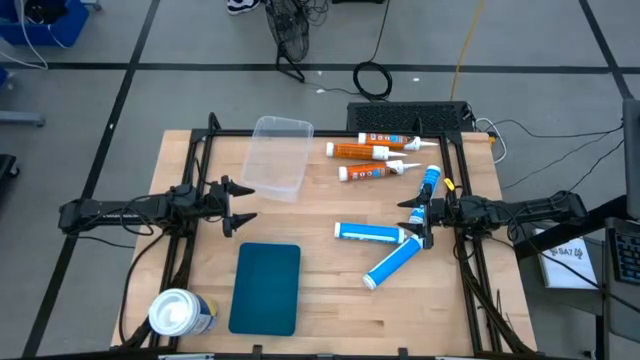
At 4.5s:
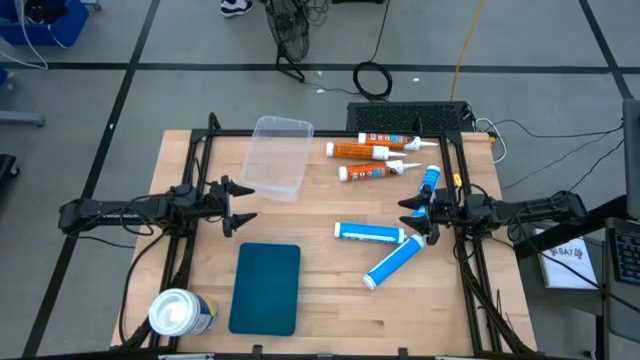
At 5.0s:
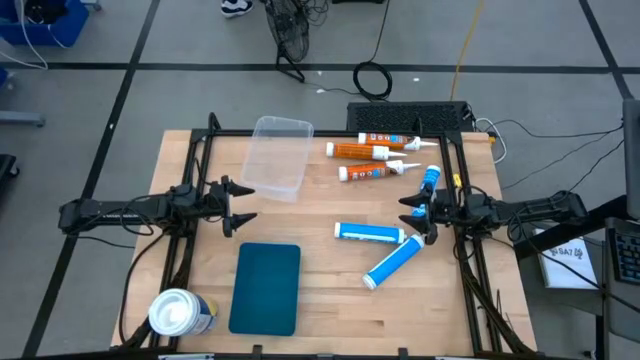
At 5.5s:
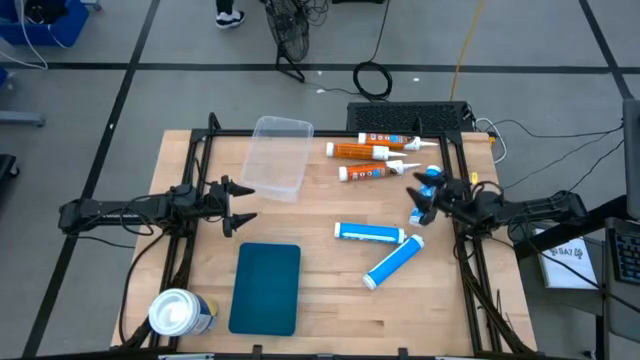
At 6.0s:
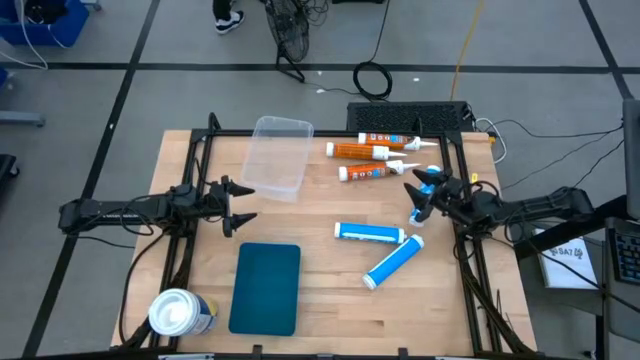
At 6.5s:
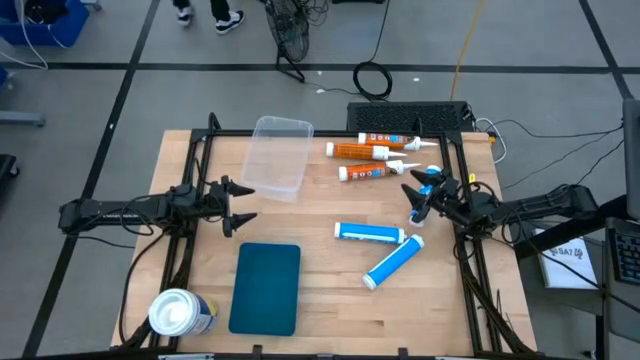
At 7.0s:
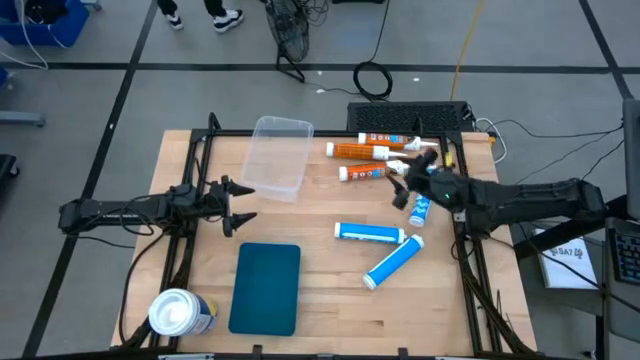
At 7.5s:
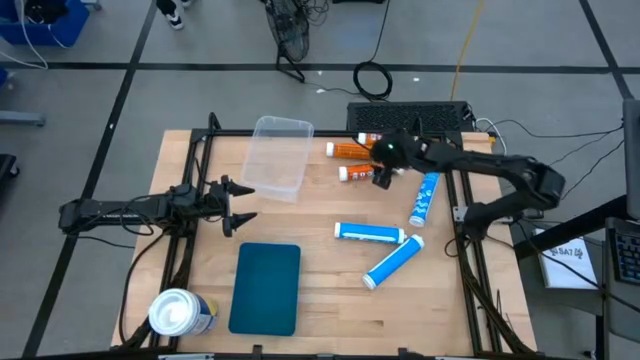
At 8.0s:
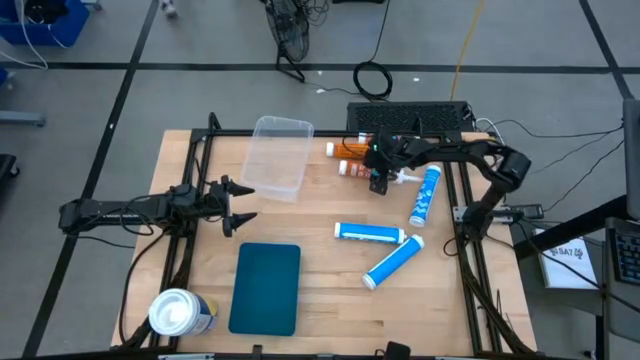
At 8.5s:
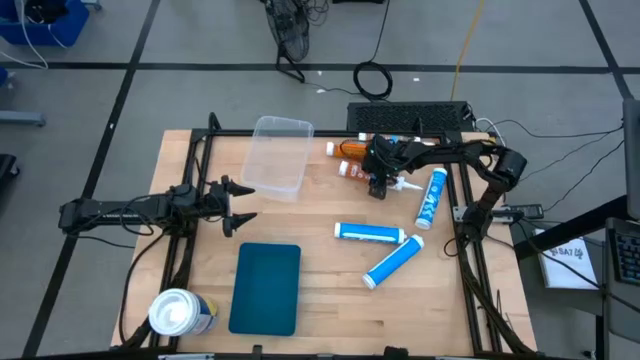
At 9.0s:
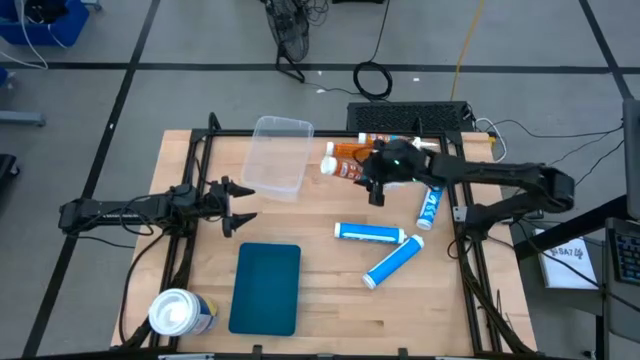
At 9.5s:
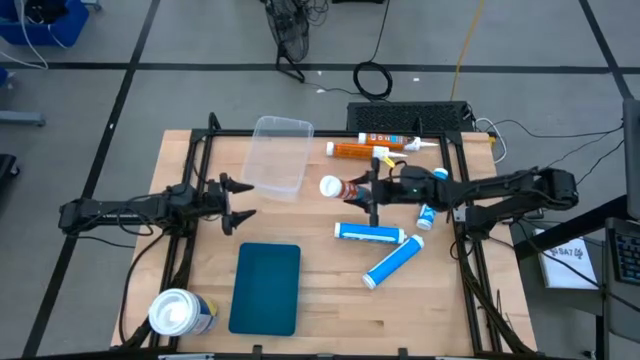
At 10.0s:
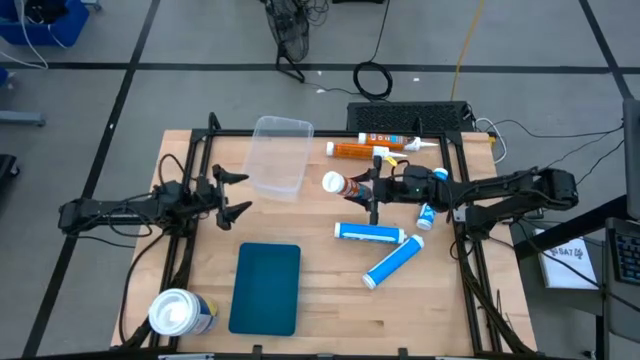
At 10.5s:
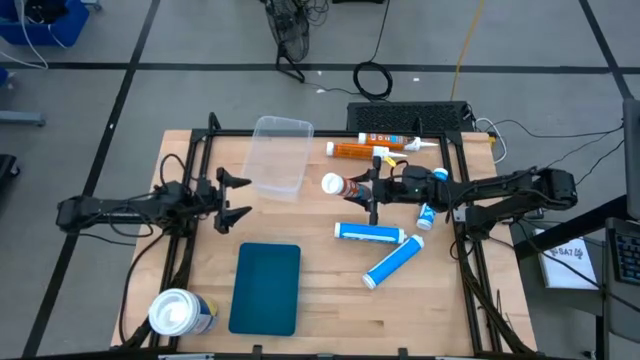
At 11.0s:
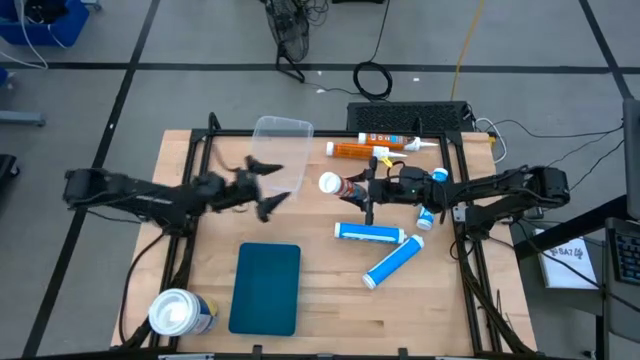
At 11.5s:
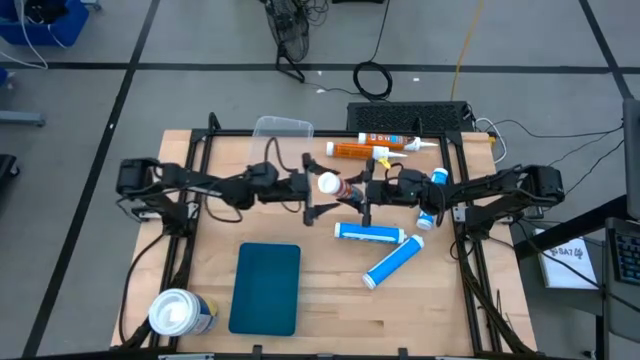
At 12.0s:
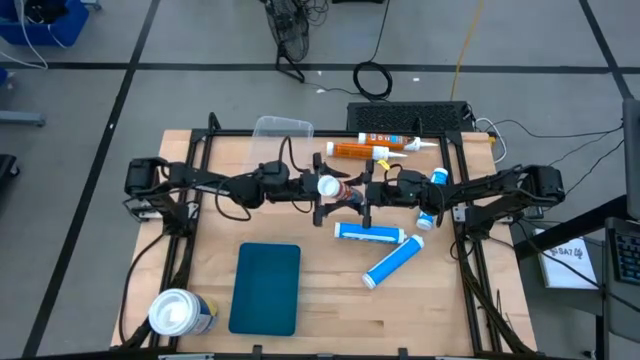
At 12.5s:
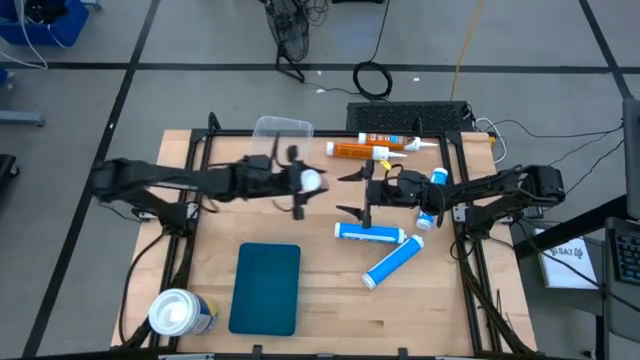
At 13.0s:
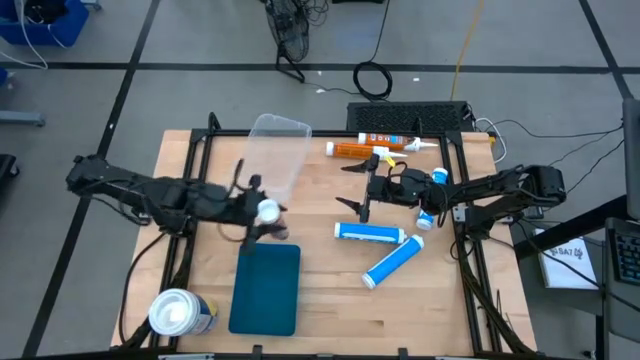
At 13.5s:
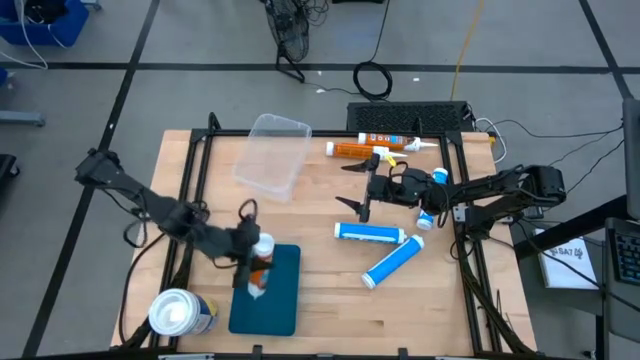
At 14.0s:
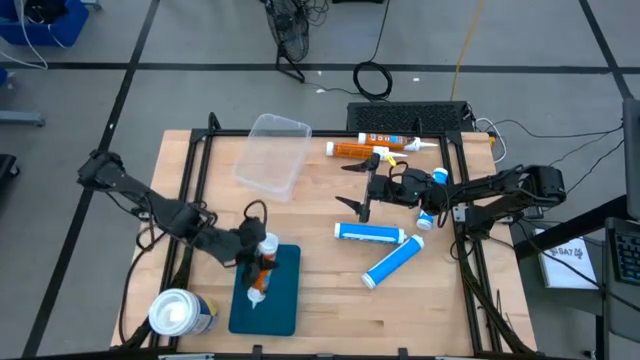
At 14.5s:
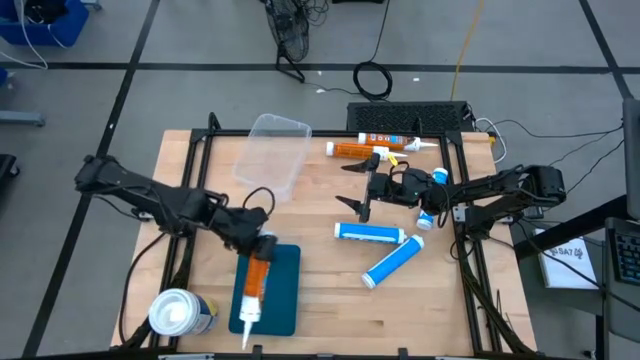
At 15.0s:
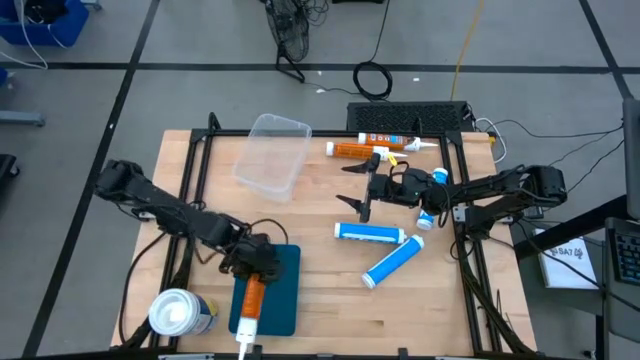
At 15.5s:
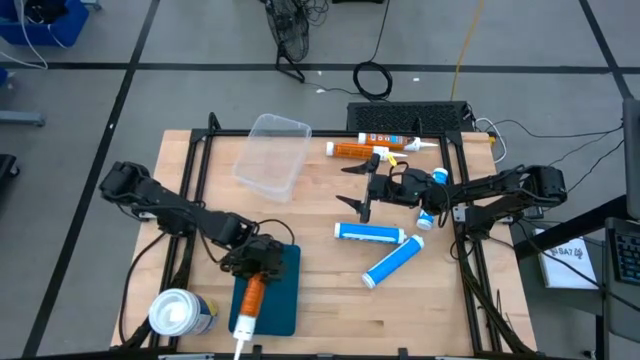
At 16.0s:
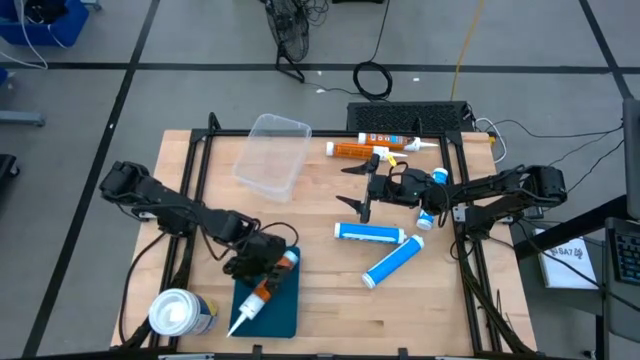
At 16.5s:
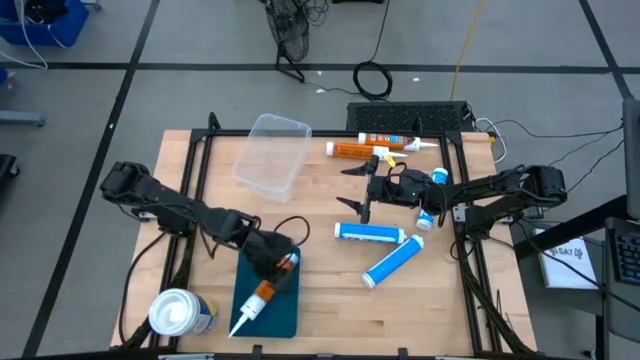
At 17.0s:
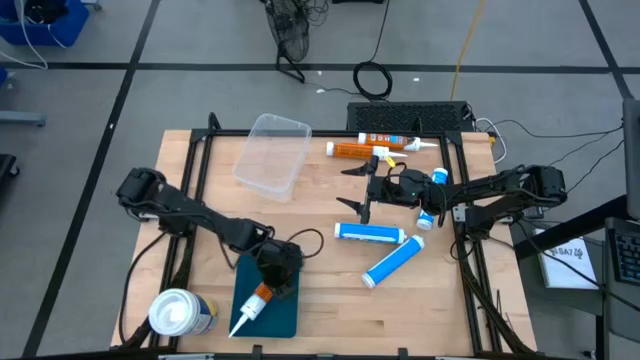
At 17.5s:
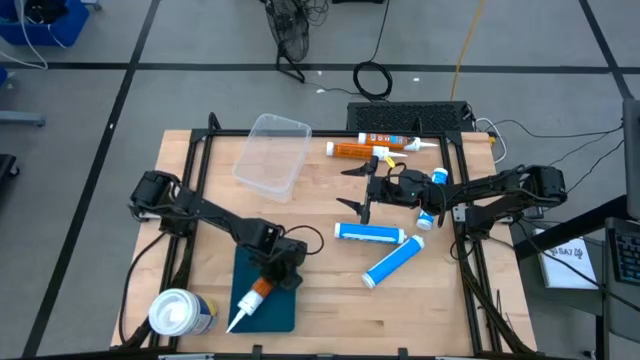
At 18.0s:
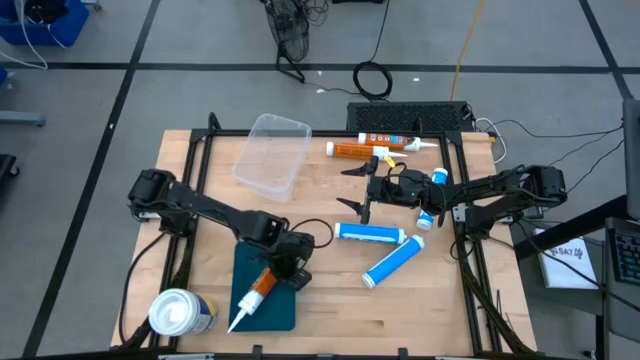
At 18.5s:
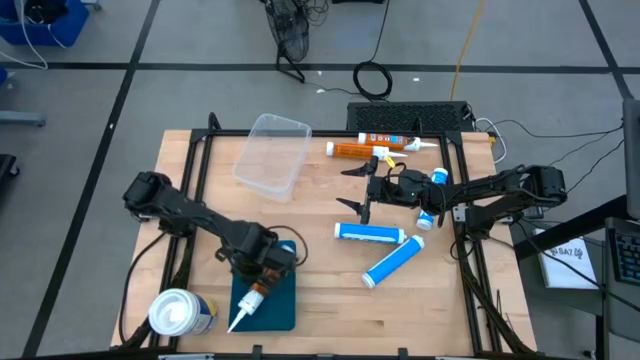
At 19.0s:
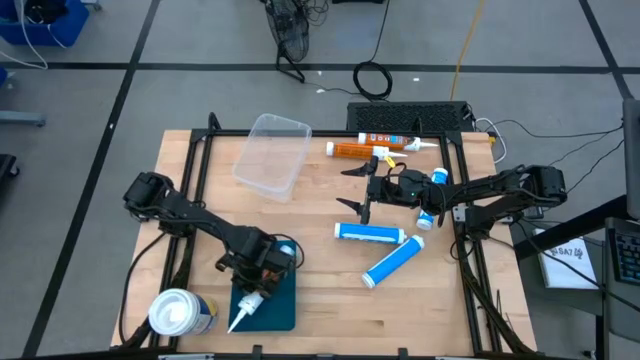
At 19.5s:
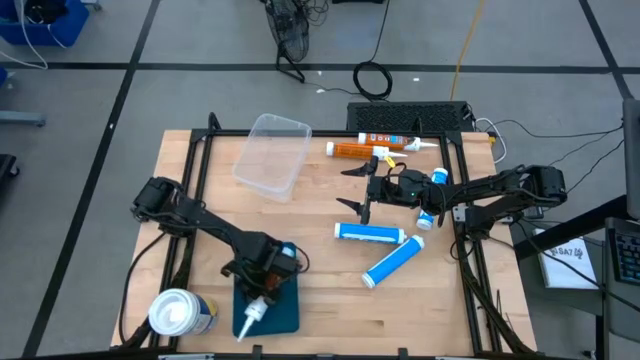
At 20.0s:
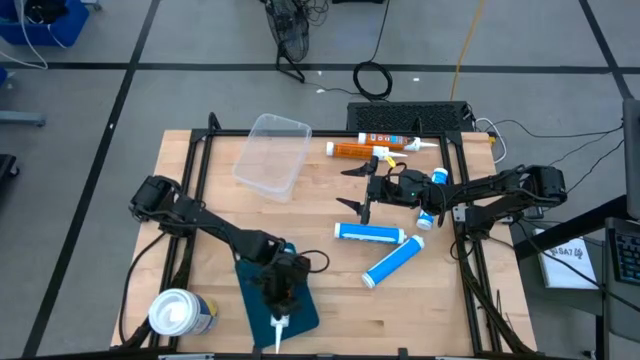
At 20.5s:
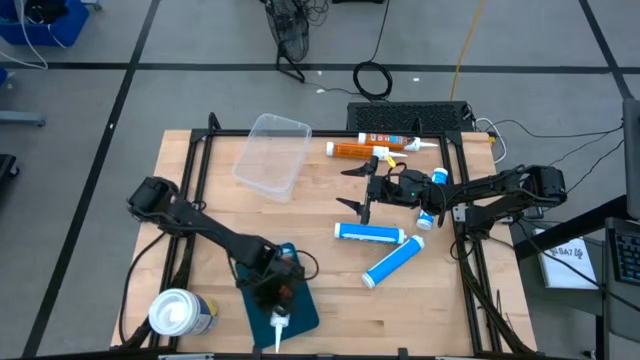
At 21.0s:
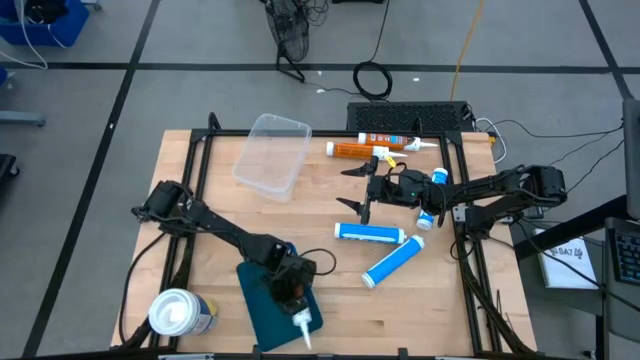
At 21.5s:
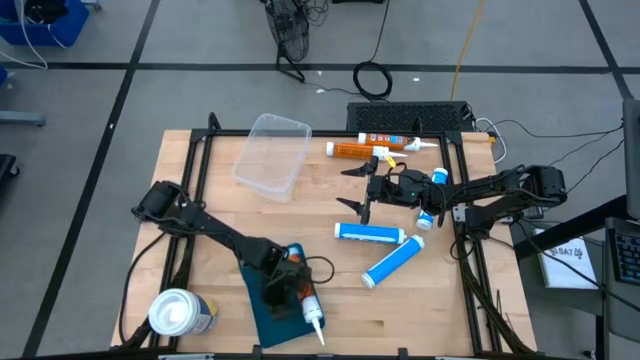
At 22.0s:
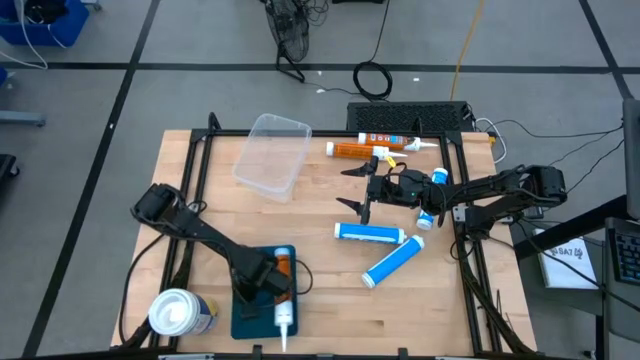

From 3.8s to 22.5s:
Task: Pick & place silicon tubes, Sealant and Lysol wipes
Put the bottom orange sealant into the blue bin
